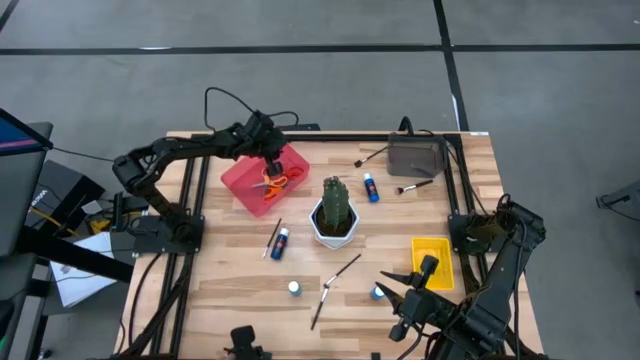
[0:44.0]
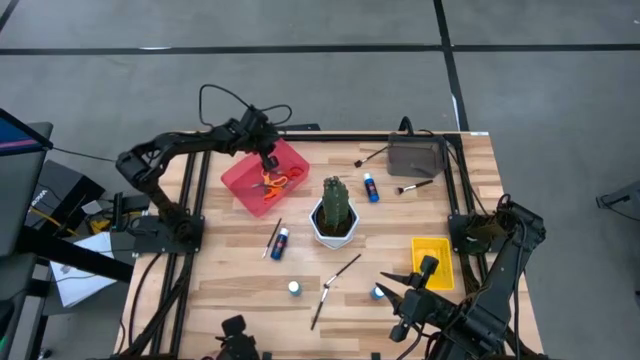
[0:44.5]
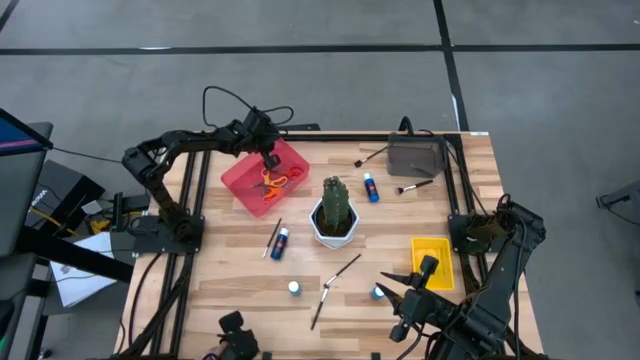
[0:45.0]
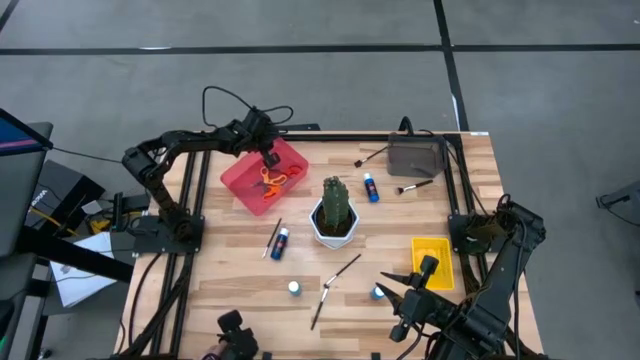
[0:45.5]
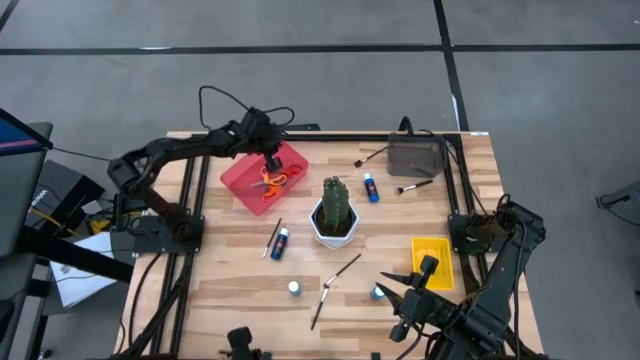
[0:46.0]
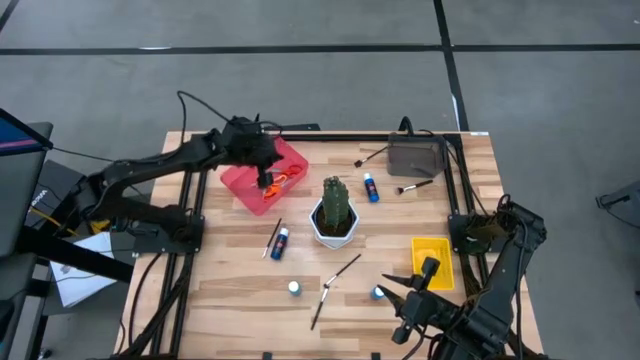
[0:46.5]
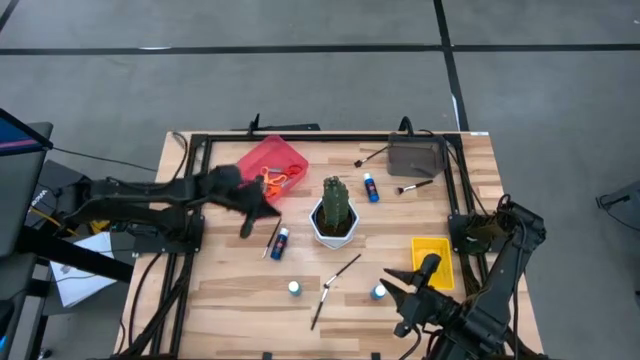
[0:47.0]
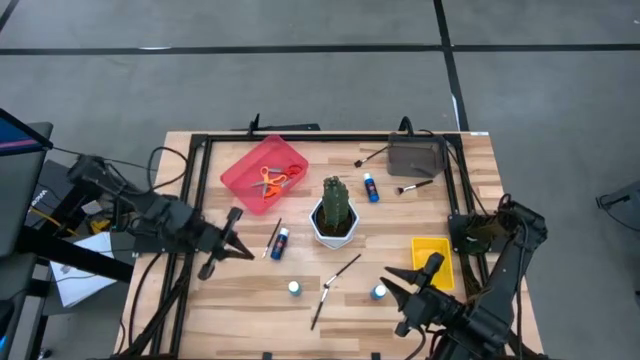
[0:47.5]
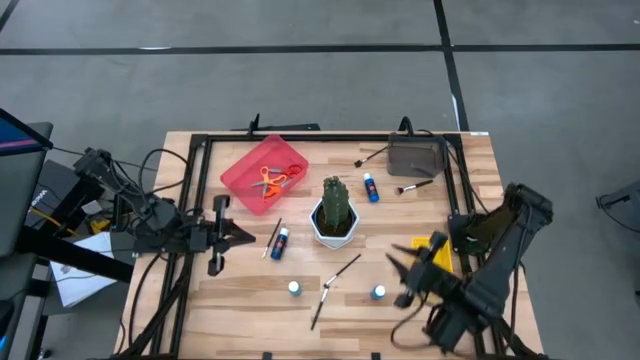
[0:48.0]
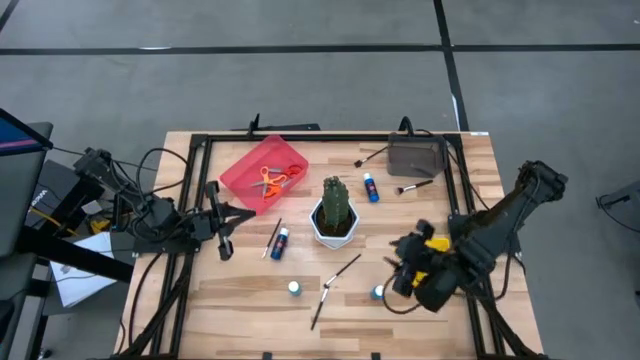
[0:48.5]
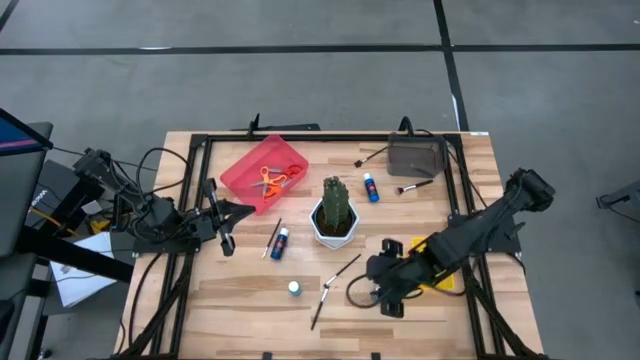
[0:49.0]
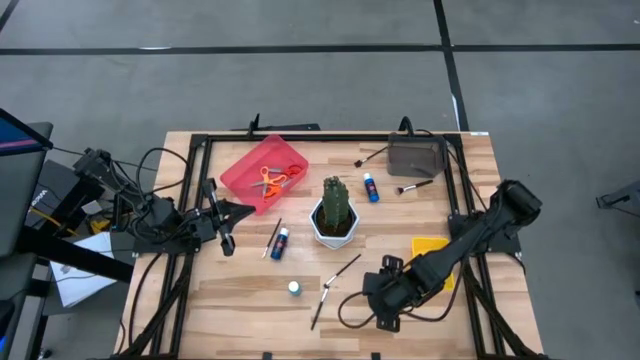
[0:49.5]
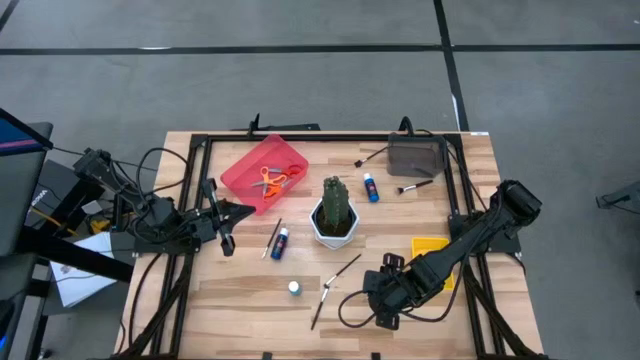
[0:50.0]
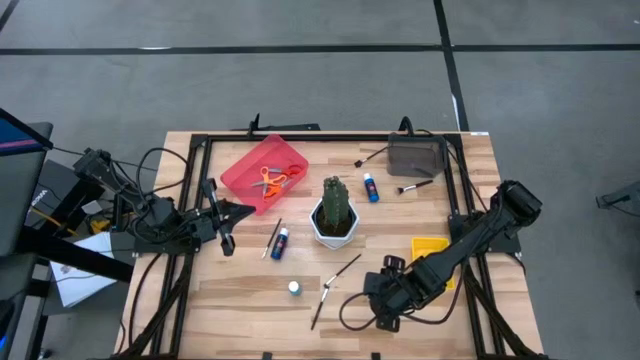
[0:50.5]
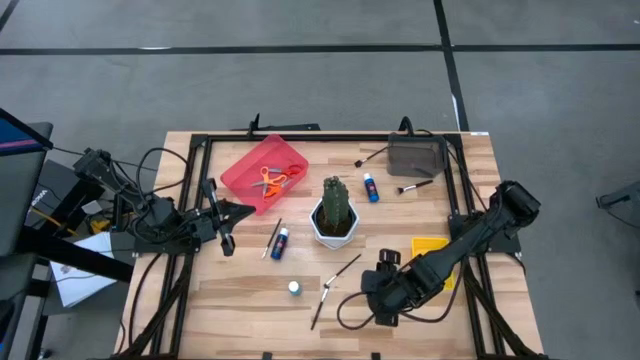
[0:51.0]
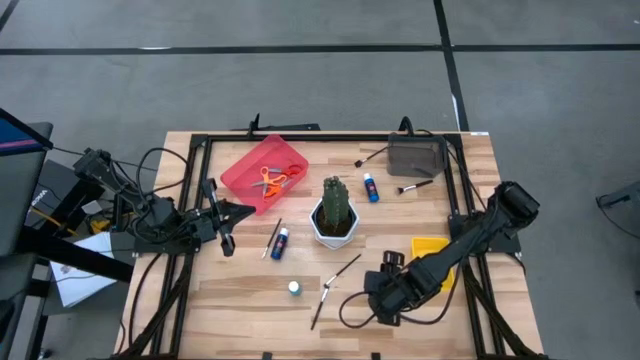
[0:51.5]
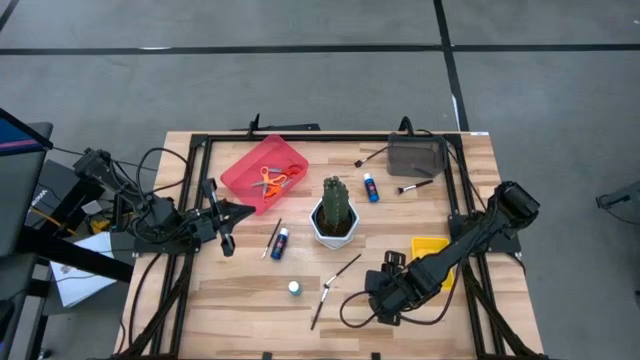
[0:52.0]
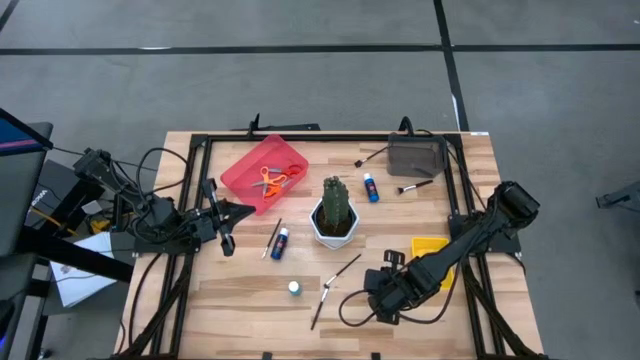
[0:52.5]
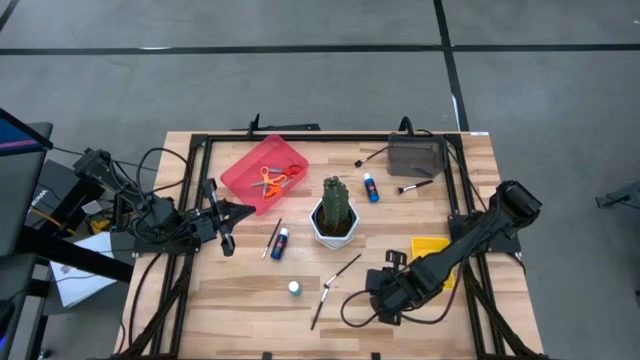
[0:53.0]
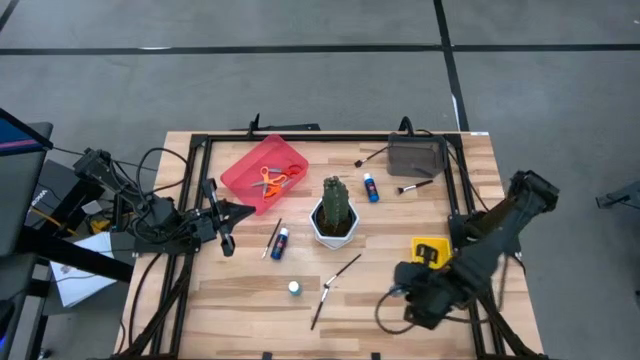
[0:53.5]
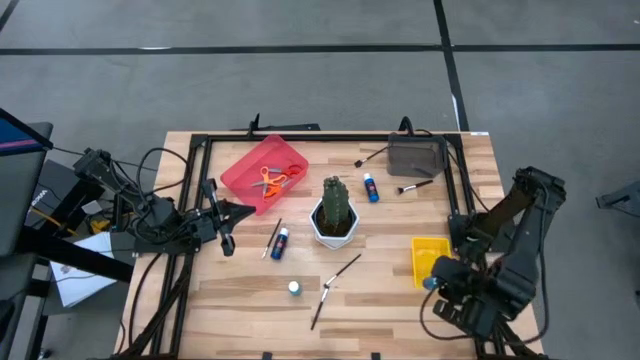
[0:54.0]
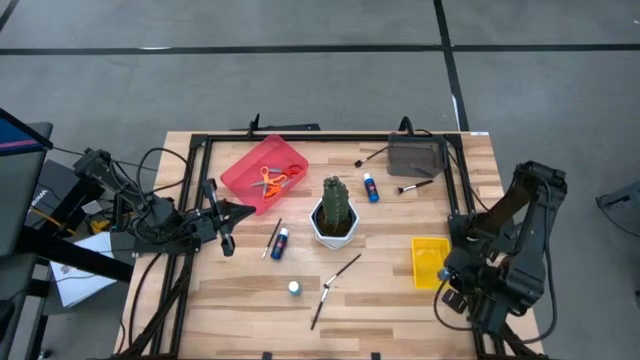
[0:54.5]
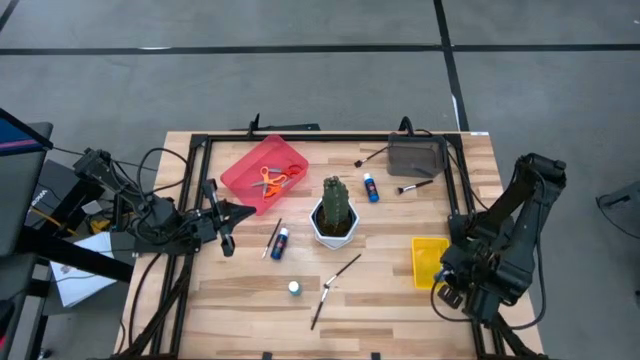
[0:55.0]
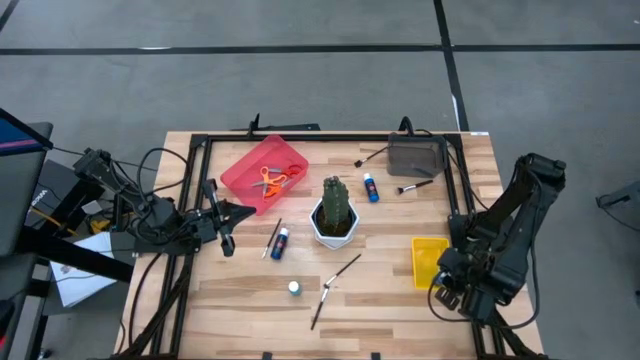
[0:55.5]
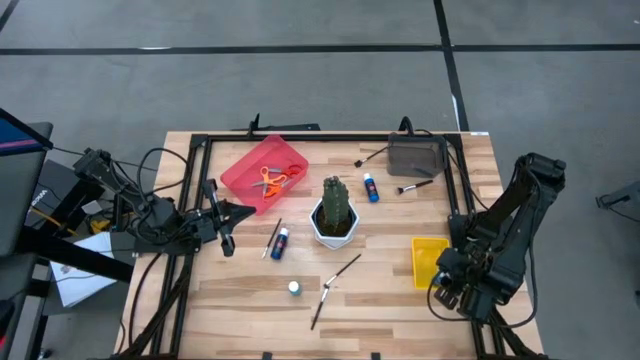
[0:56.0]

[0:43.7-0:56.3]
Task: Pick & Place Paint Supplies
Put the right light blue paint bottle into the yellow basket

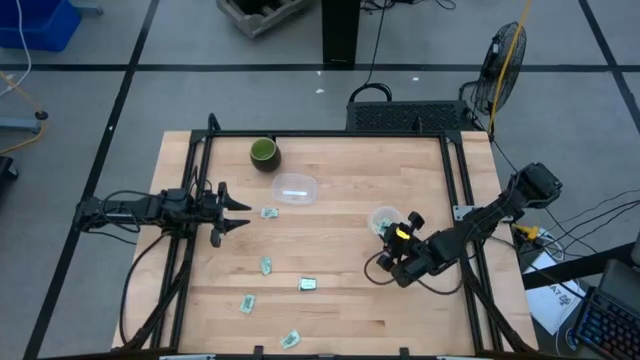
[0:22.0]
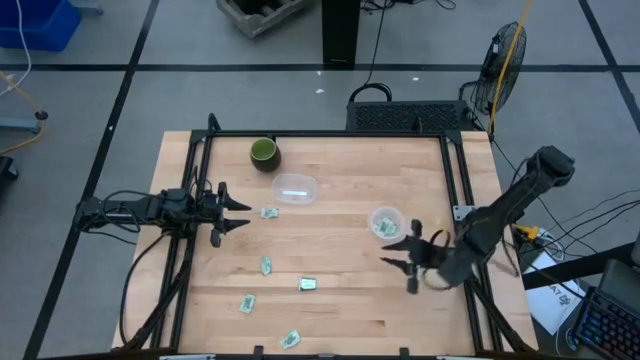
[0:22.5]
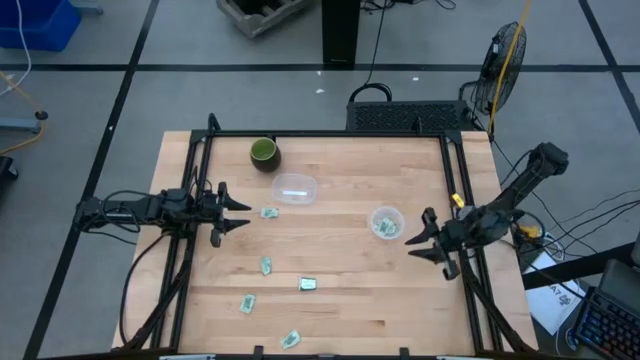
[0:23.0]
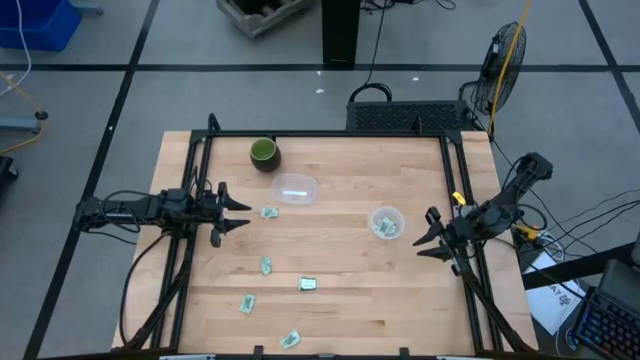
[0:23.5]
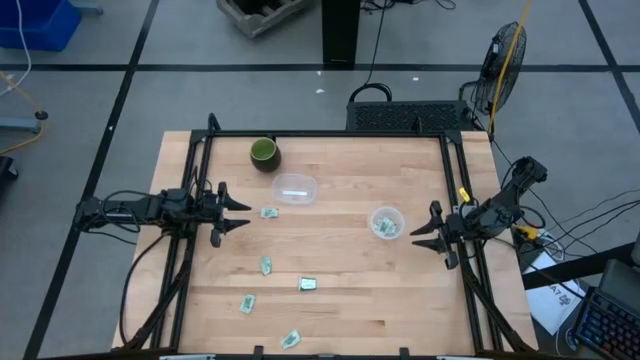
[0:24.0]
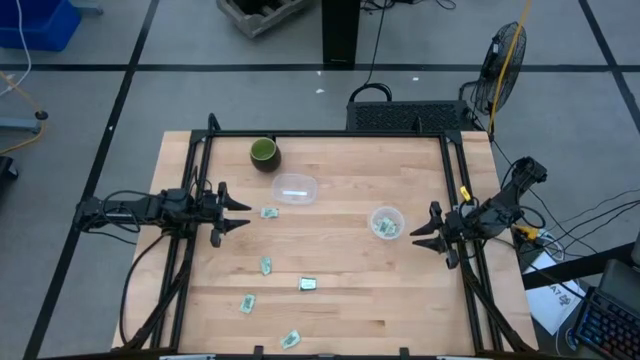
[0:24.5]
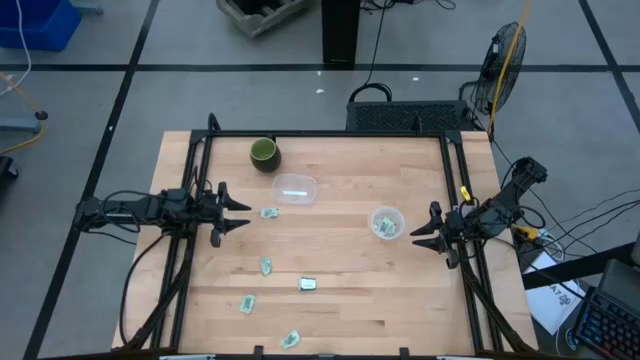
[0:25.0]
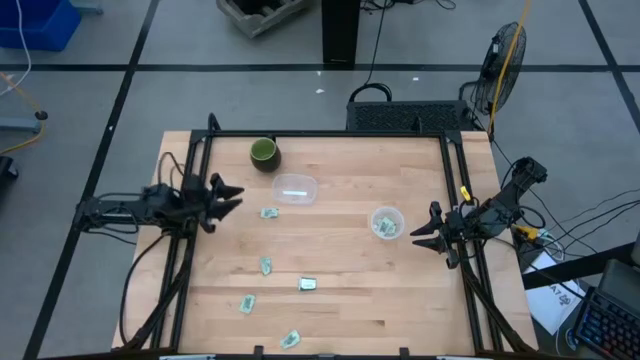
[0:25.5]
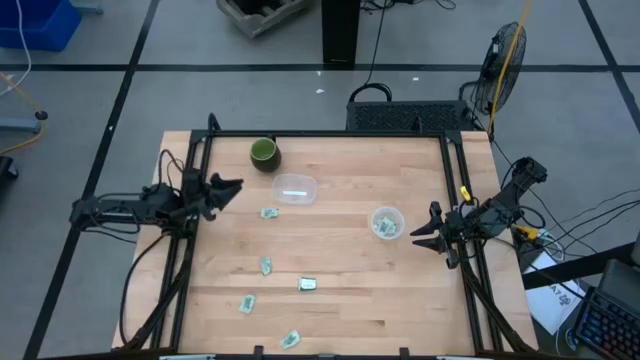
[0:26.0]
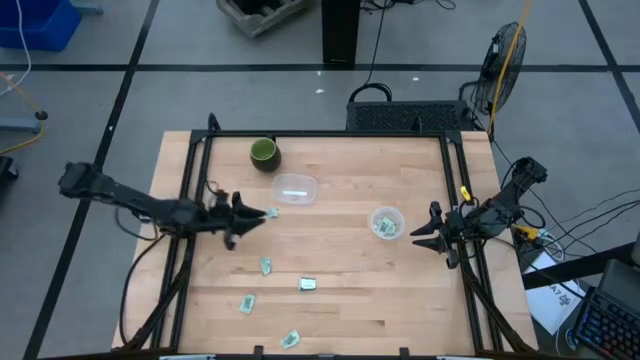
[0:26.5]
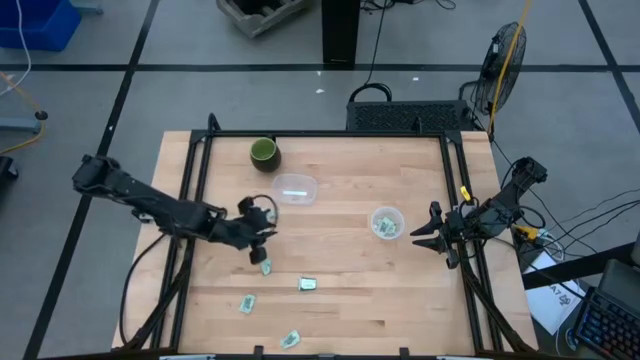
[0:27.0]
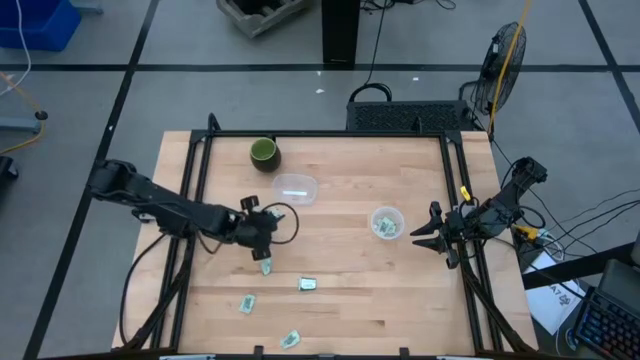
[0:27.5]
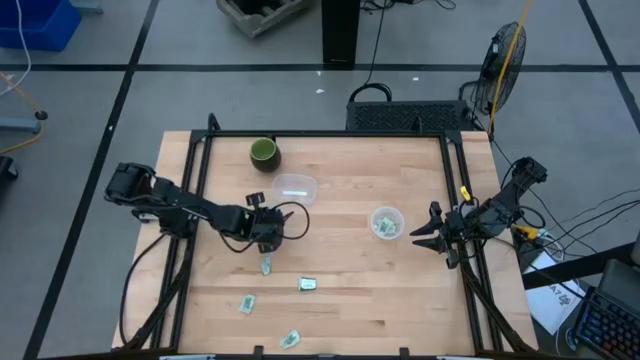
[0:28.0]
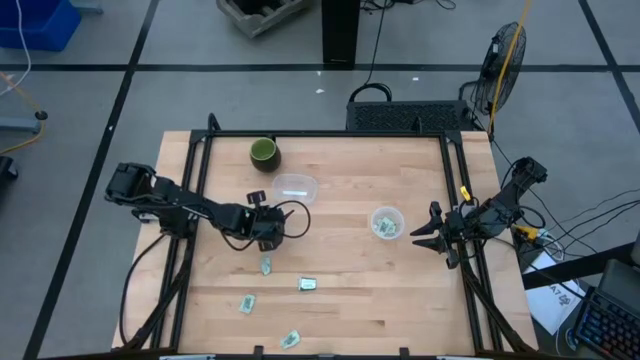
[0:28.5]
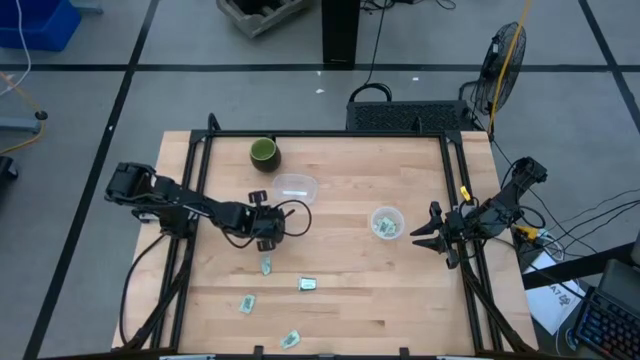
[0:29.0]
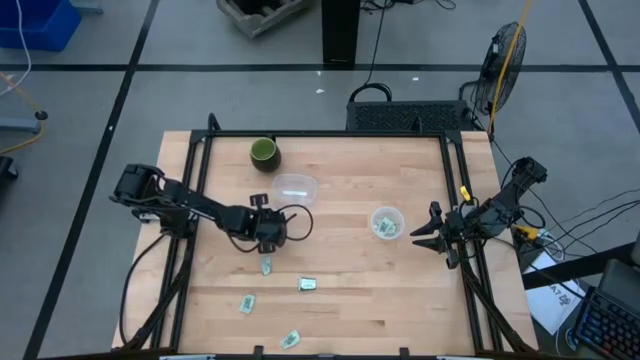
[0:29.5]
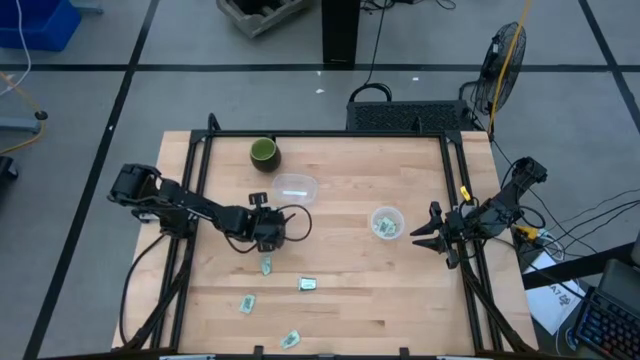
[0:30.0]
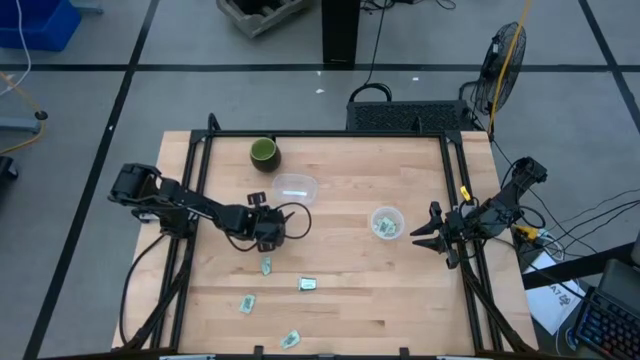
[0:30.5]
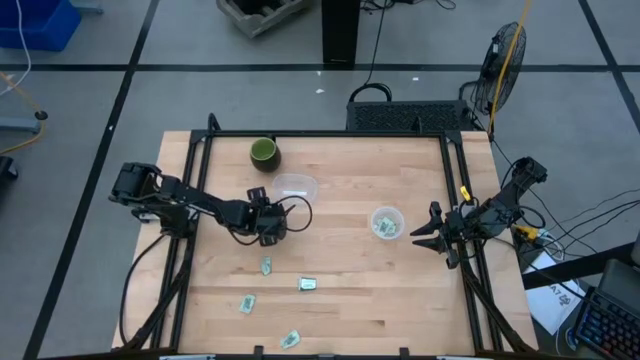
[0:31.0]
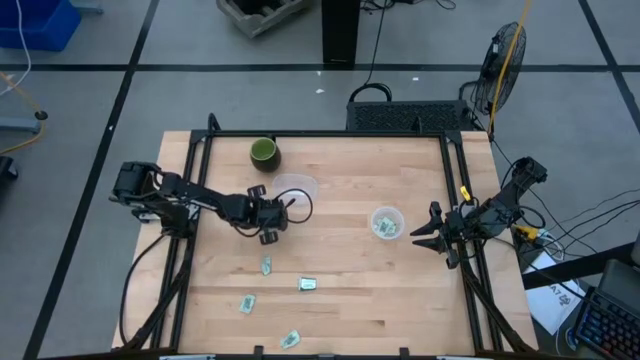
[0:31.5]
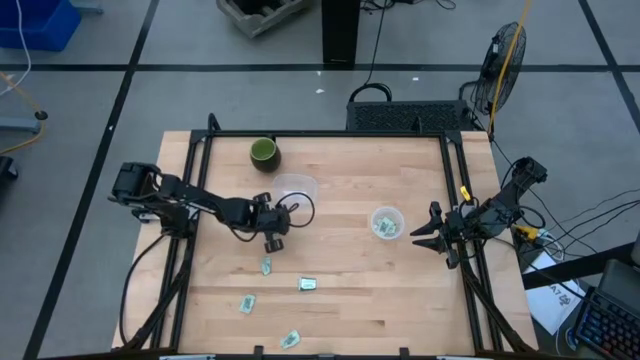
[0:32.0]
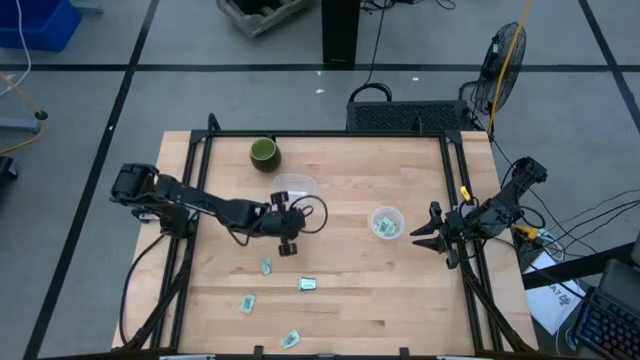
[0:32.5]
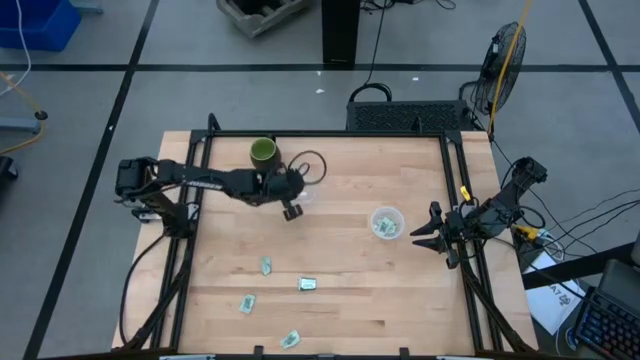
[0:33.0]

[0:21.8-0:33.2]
Task: Pick and place items into bin
Put the light green stevia packet into the left transparent bin
